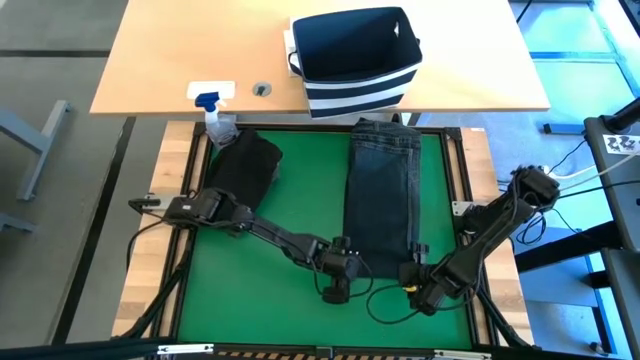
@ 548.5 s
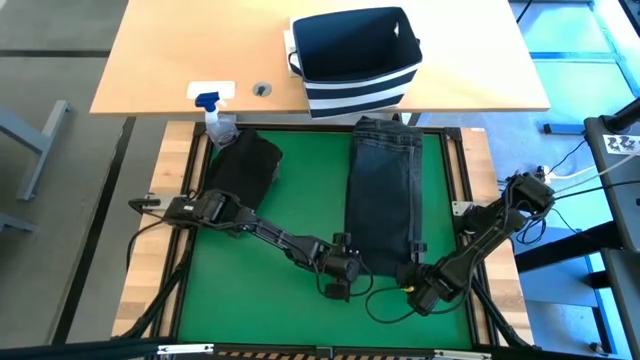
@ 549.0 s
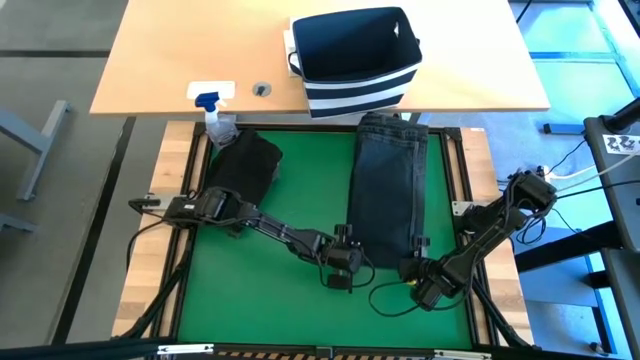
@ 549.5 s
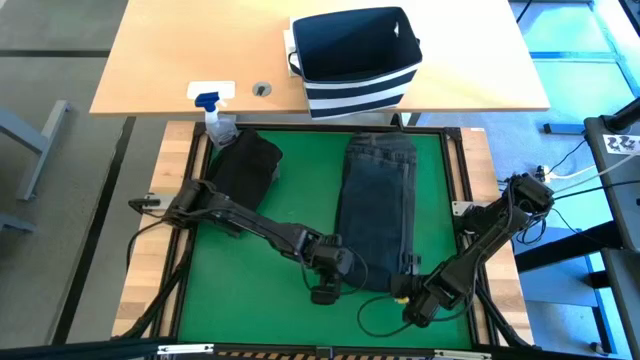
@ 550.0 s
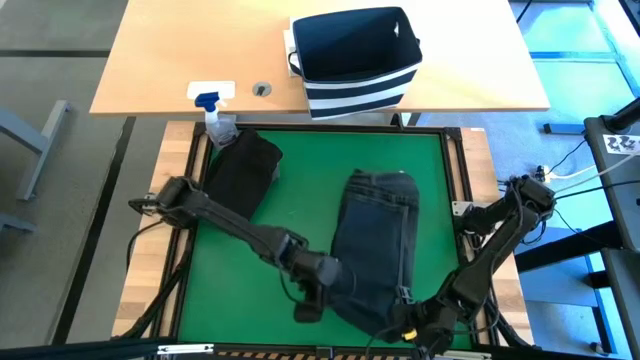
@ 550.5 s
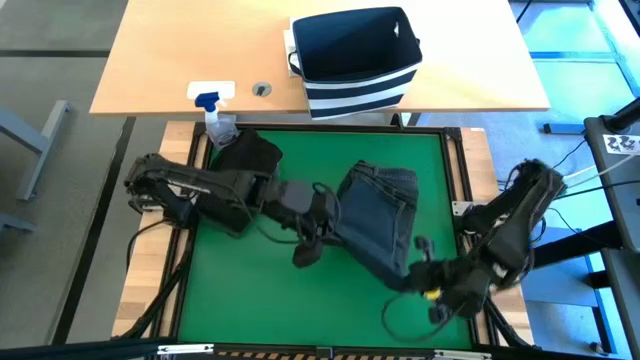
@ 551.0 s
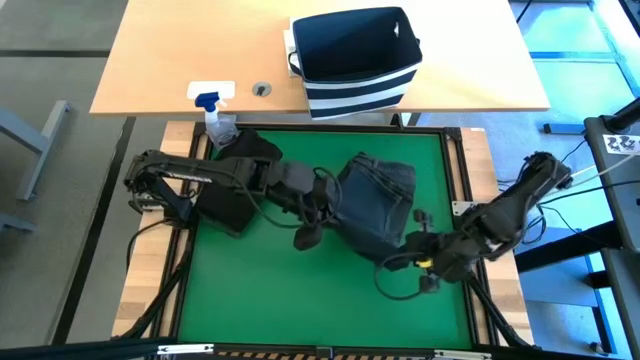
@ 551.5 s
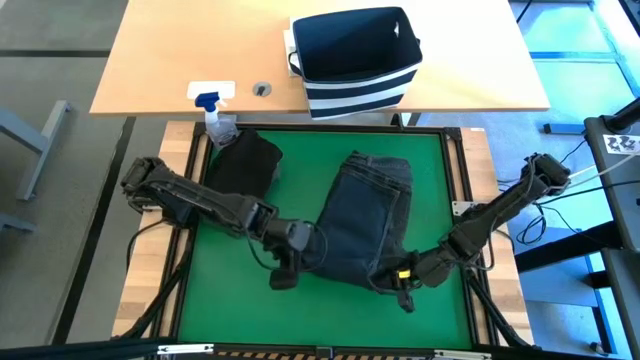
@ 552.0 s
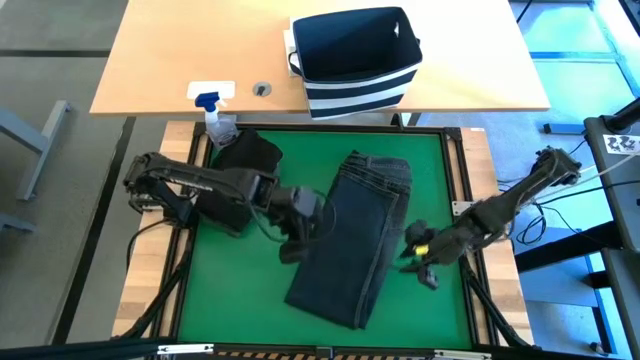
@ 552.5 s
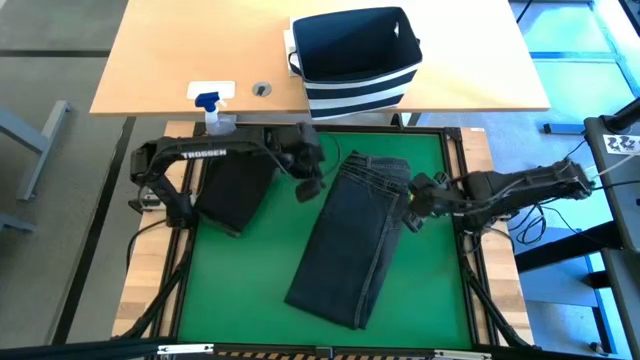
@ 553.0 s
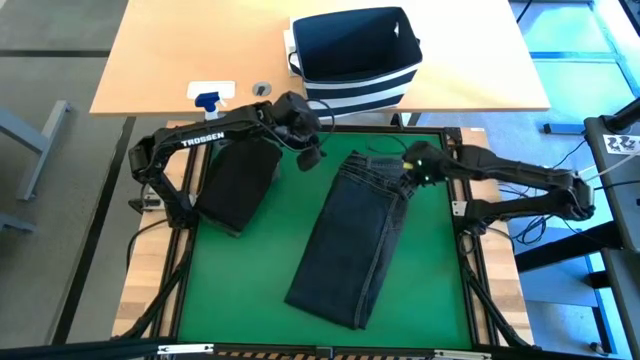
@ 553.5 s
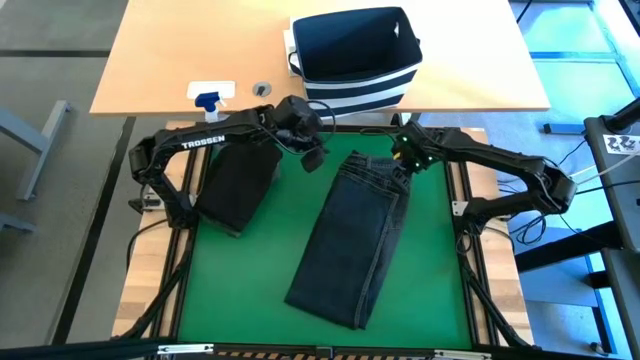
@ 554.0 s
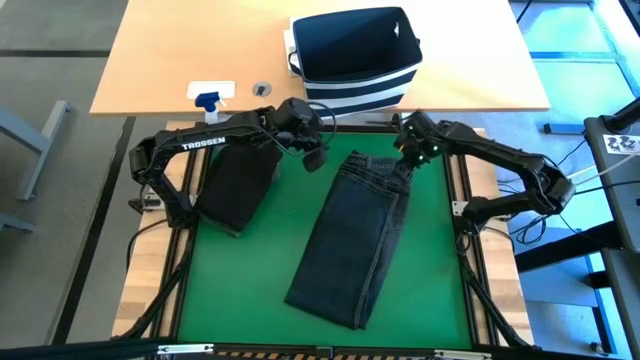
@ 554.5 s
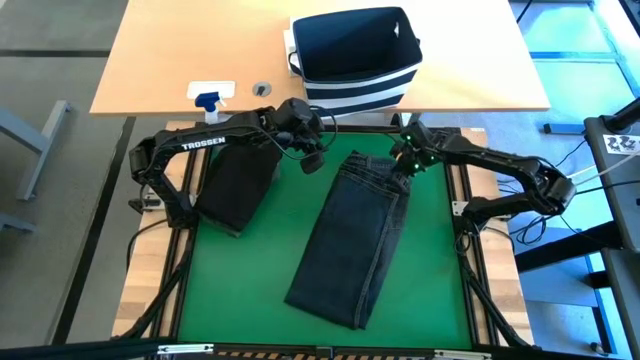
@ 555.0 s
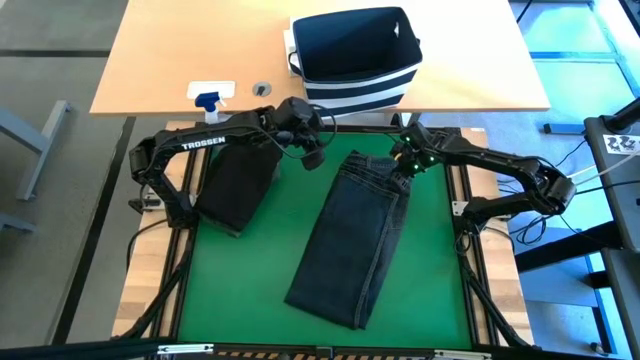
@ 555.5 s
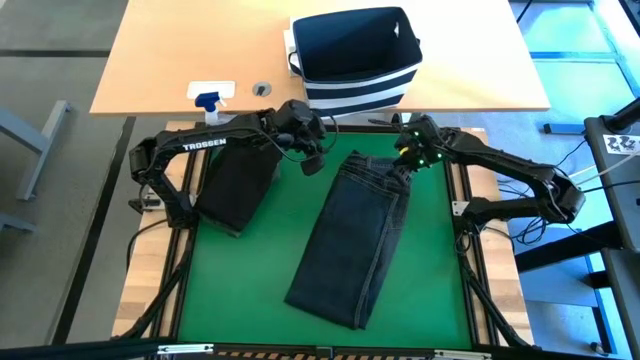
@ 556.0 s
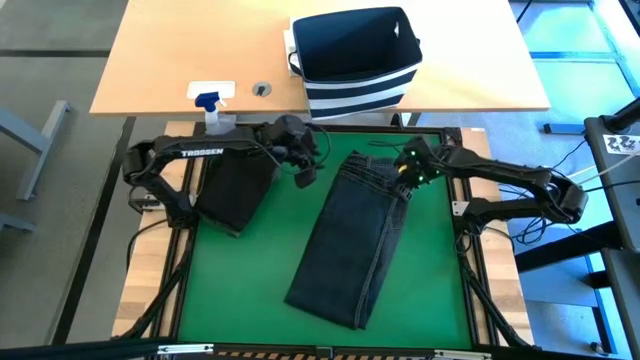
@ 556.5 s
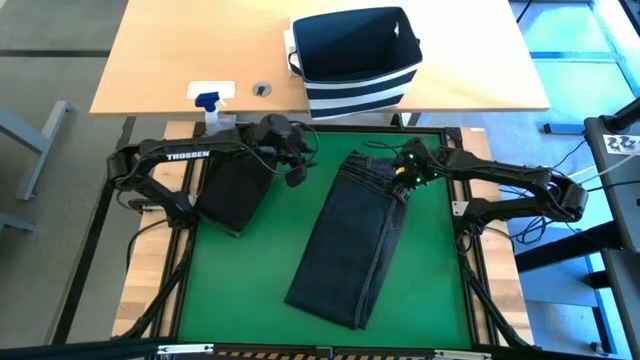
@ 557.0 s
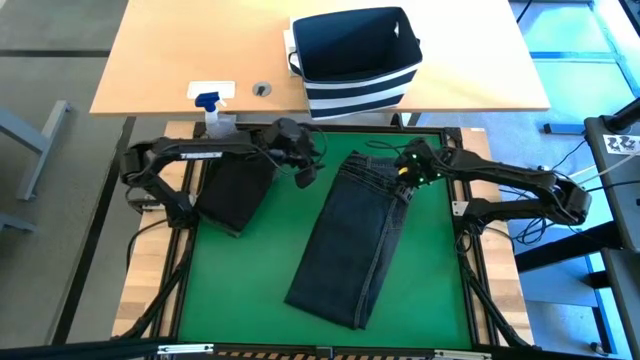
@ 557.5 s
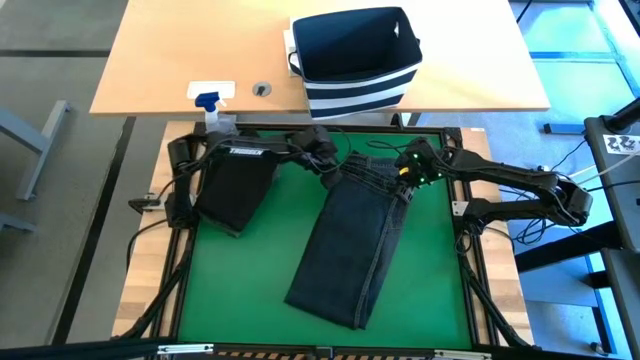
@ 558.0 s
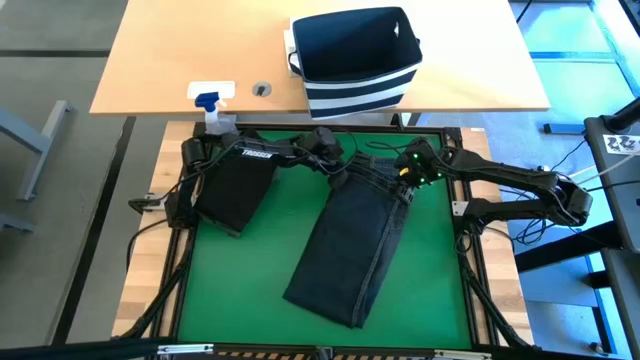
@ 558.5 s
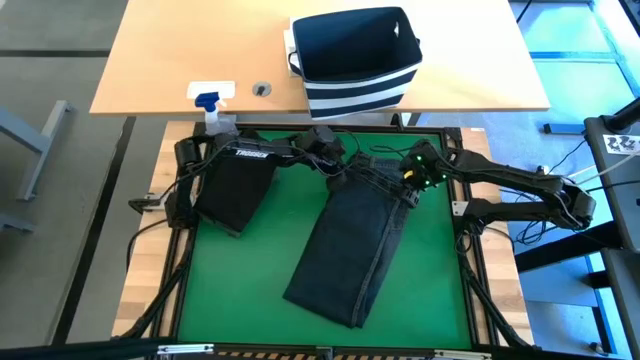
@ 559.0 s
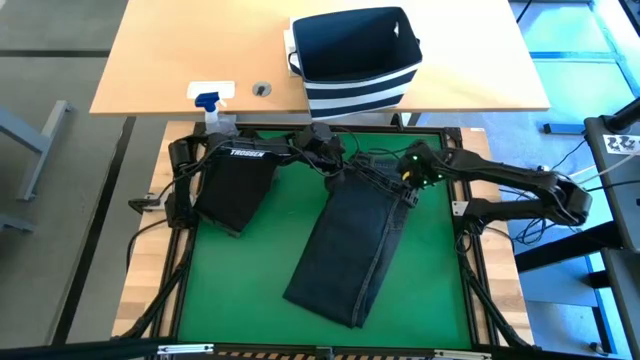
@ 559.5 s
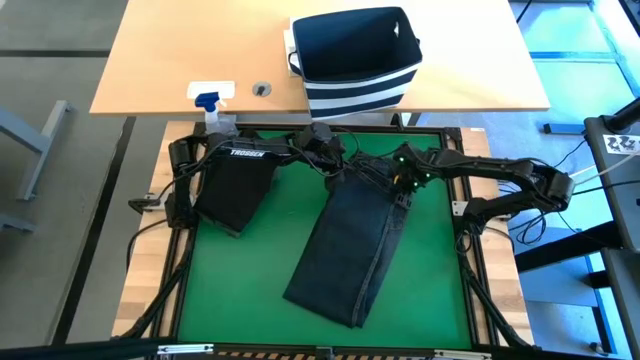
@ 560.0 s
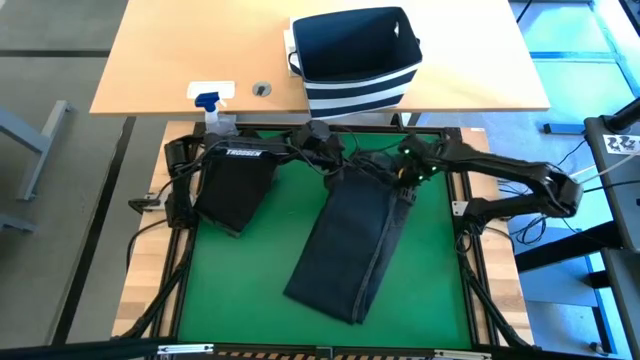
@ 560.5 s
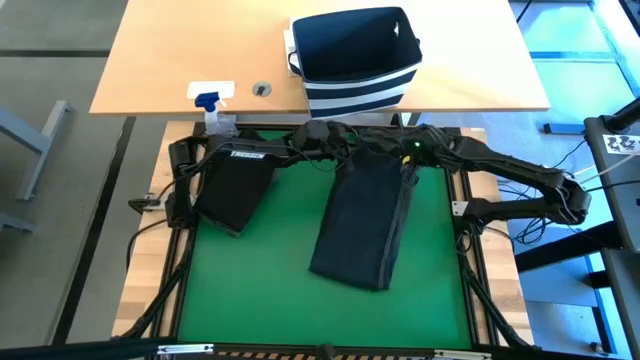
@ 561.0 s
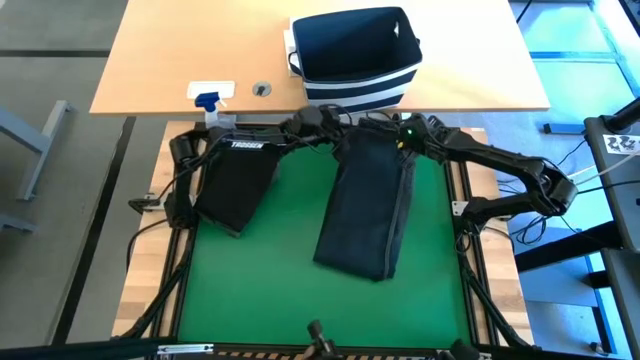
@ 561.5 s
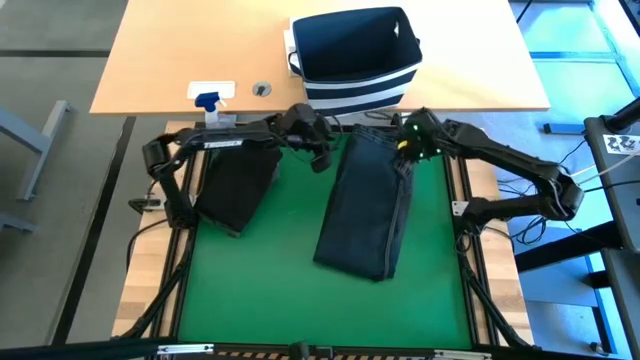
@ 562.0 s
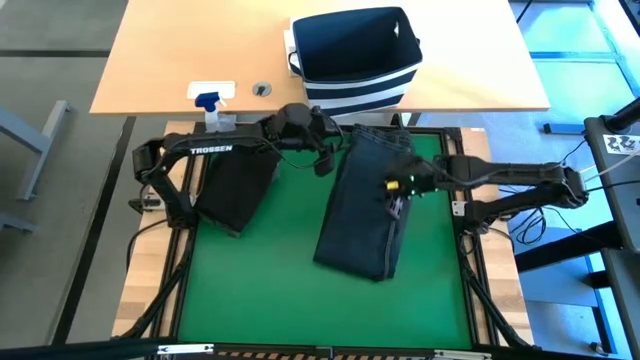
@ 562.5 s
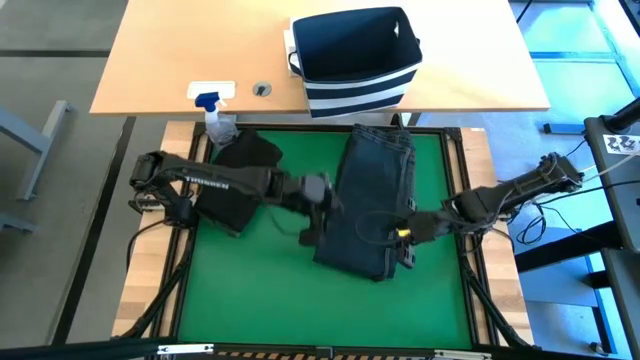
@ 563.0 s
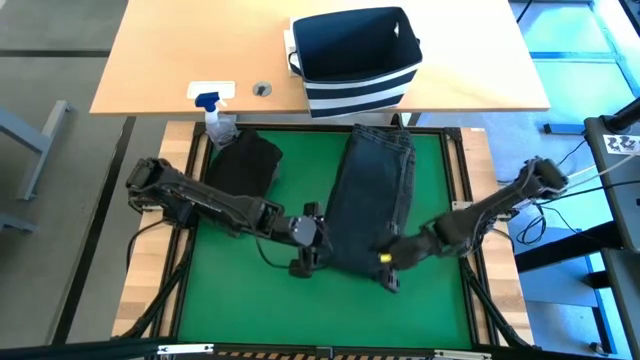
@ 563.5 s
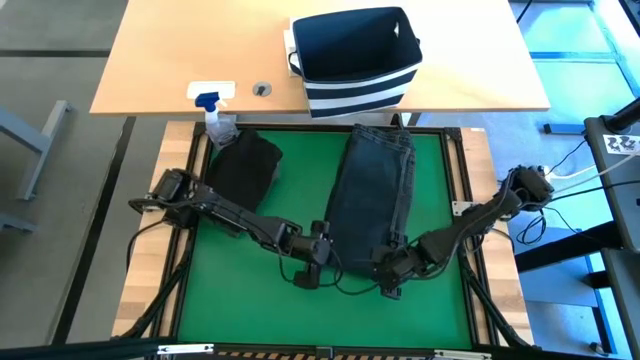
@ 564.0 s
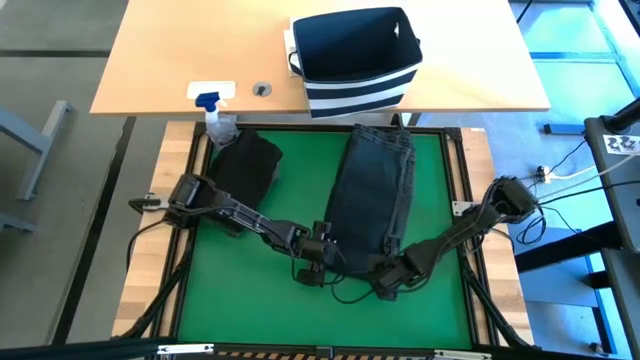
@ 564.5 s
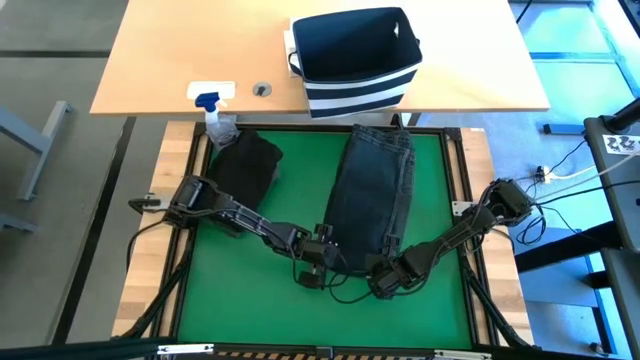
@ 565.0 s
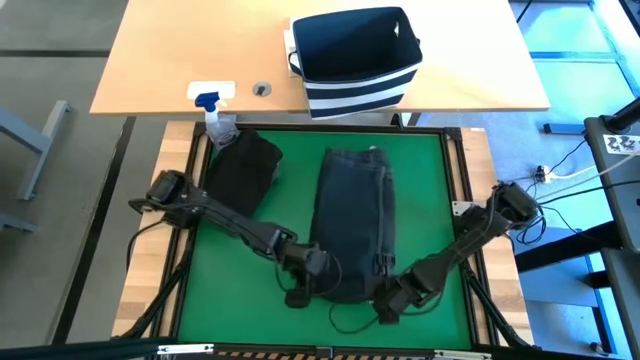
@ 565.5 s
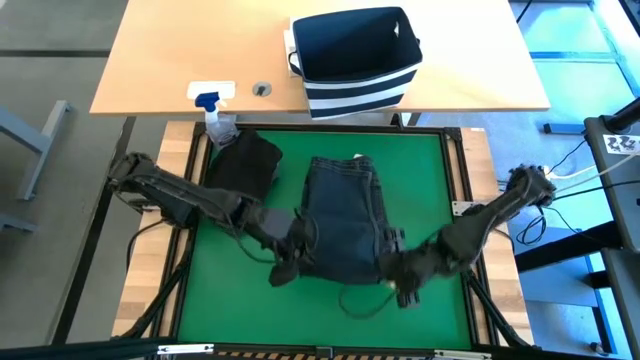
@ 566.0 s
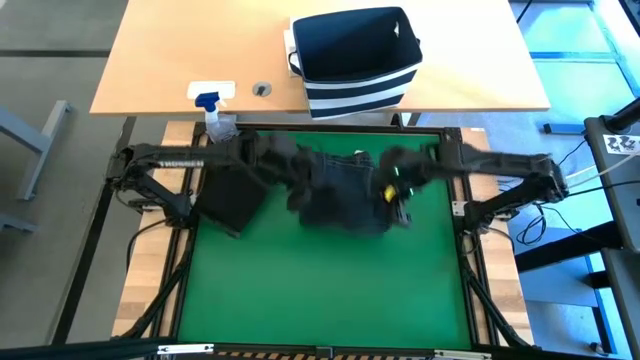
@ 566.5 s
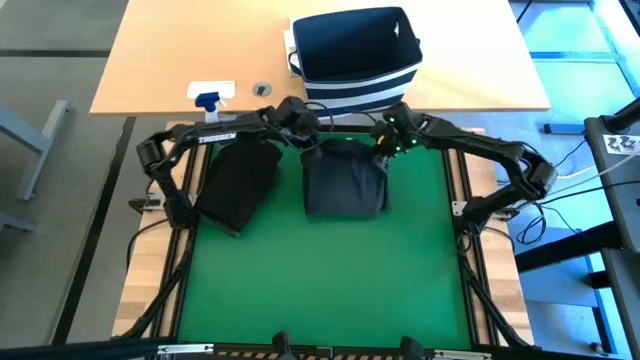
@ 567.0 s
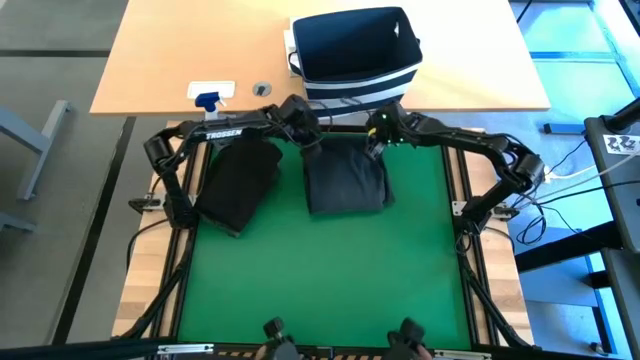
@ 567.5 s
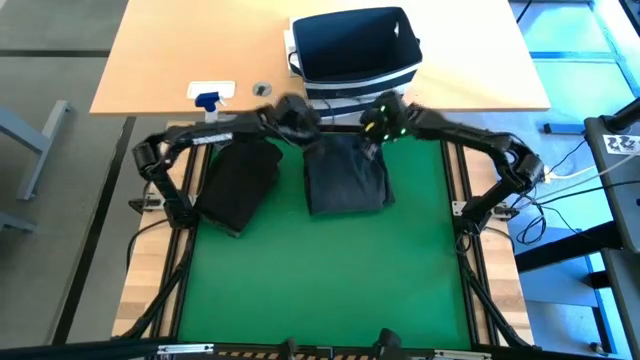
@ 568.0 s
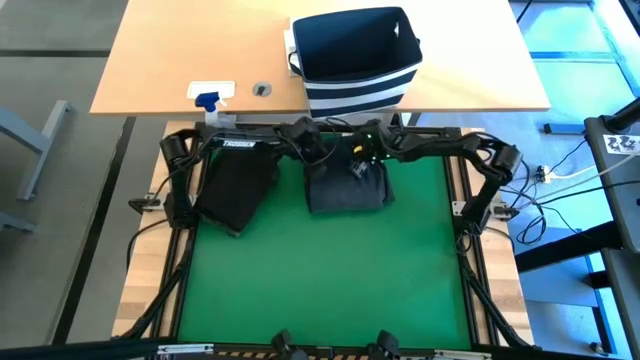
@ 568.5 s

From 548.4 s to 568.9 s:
Task: Fold Laundry from Bin
Fold the blue pants
